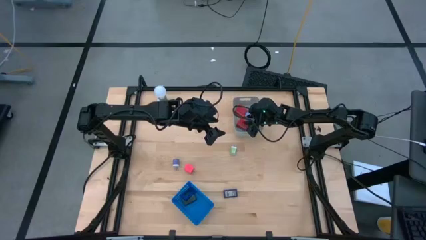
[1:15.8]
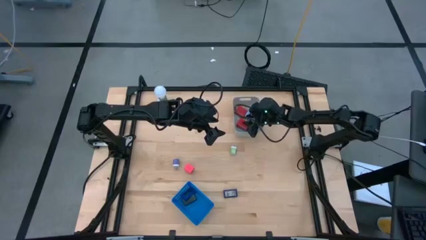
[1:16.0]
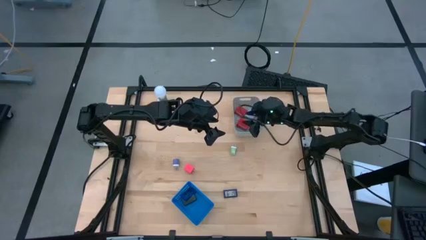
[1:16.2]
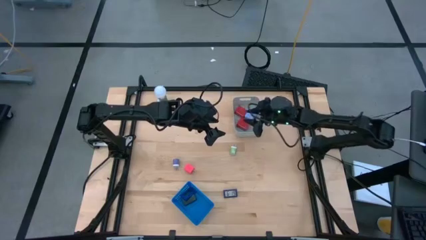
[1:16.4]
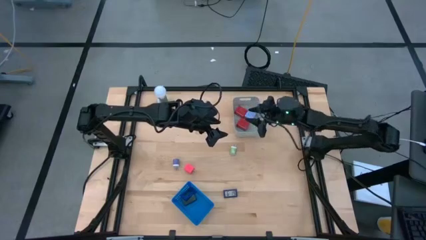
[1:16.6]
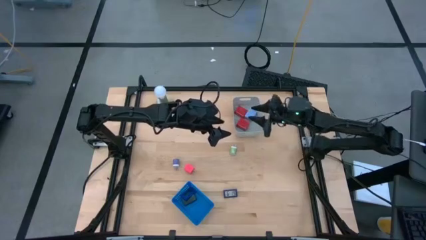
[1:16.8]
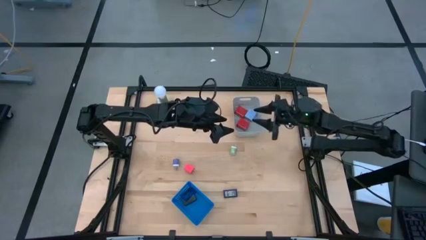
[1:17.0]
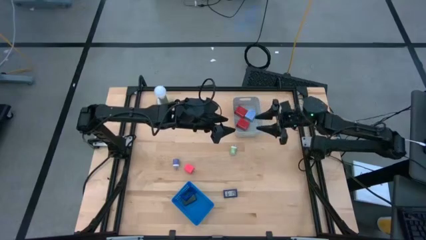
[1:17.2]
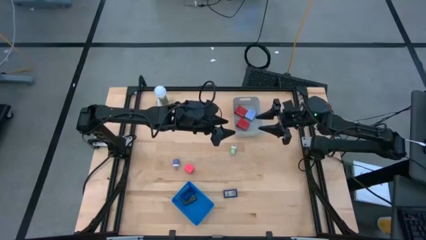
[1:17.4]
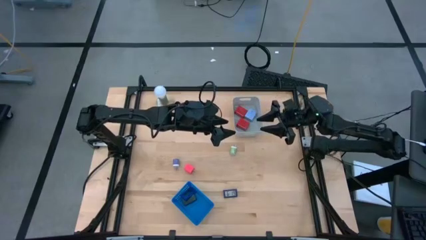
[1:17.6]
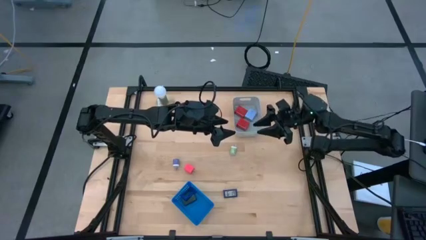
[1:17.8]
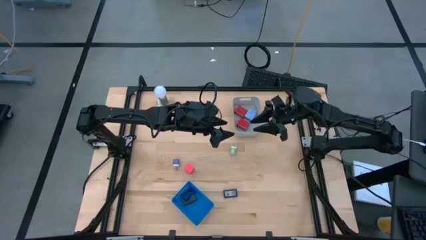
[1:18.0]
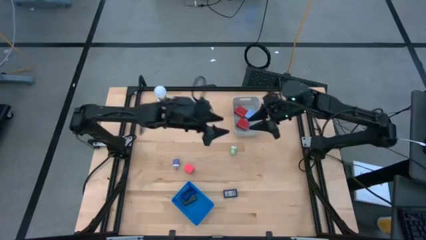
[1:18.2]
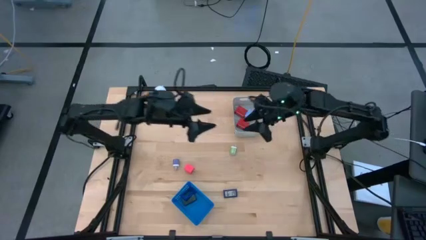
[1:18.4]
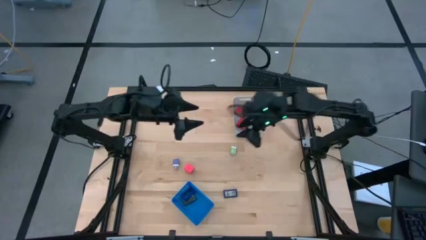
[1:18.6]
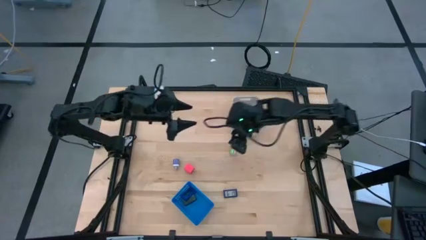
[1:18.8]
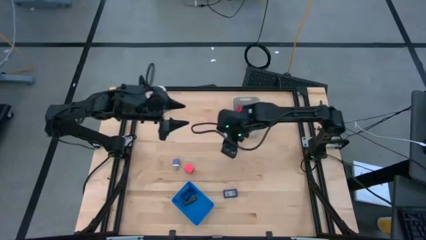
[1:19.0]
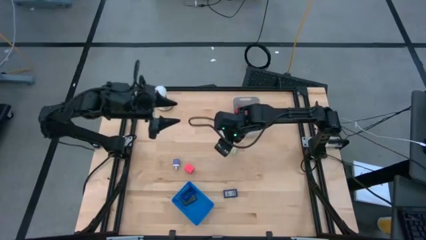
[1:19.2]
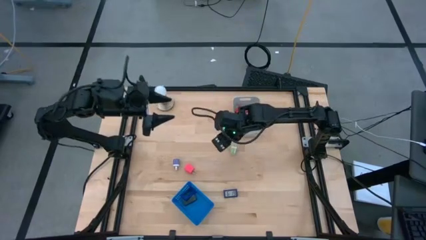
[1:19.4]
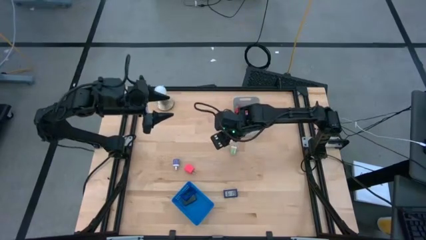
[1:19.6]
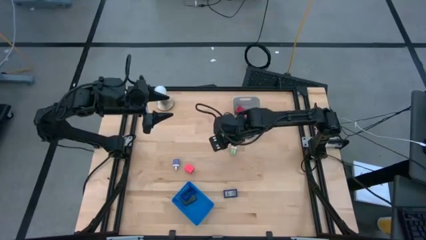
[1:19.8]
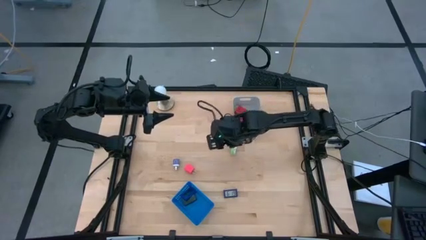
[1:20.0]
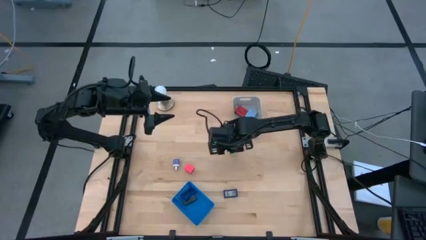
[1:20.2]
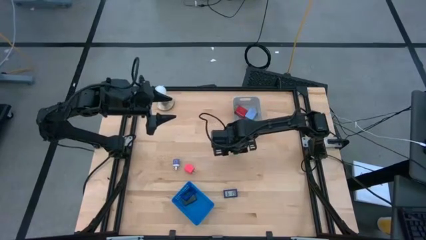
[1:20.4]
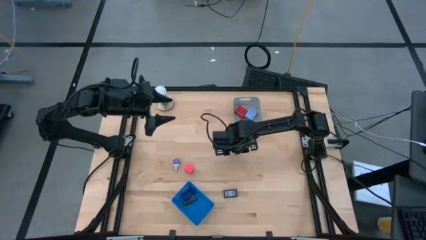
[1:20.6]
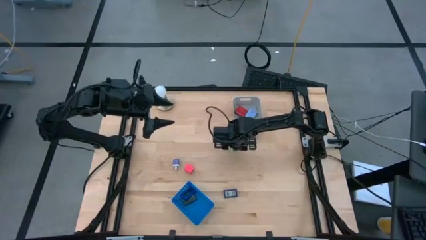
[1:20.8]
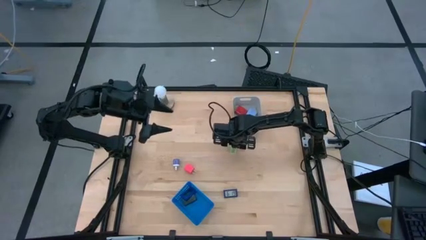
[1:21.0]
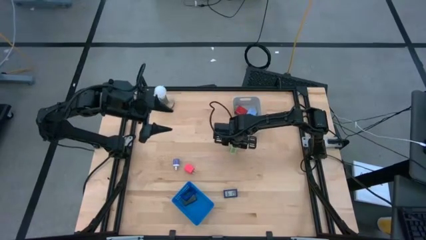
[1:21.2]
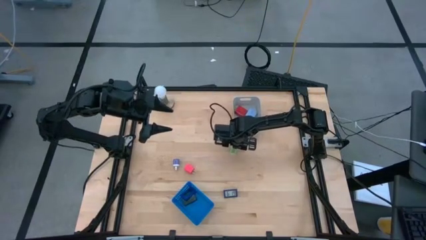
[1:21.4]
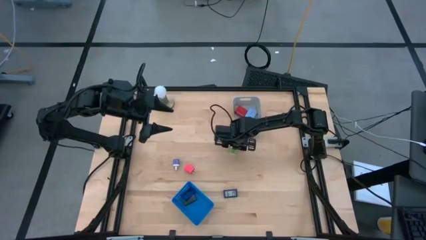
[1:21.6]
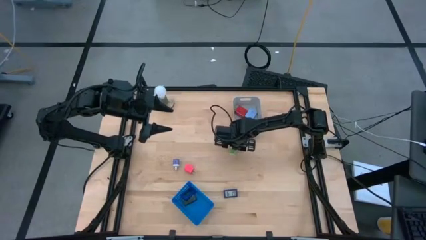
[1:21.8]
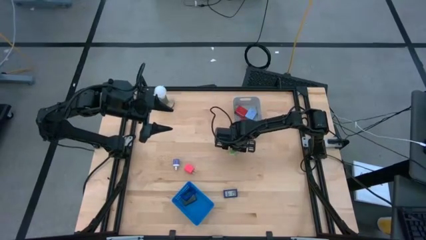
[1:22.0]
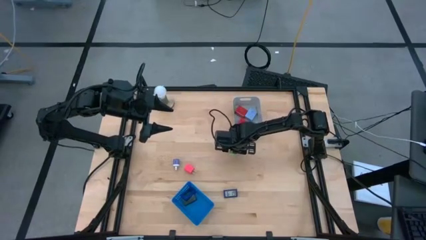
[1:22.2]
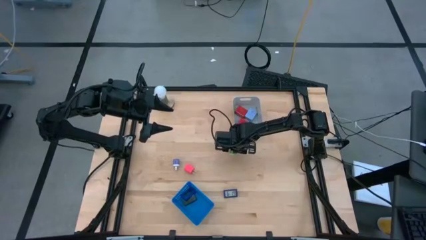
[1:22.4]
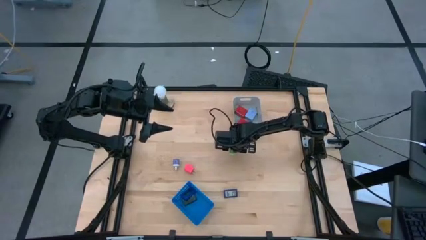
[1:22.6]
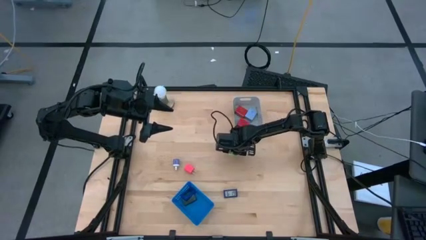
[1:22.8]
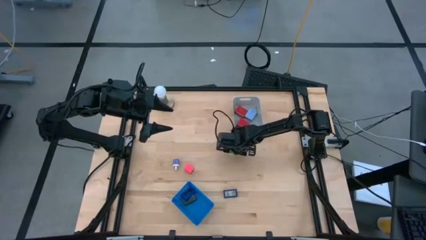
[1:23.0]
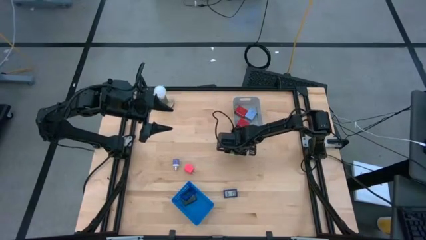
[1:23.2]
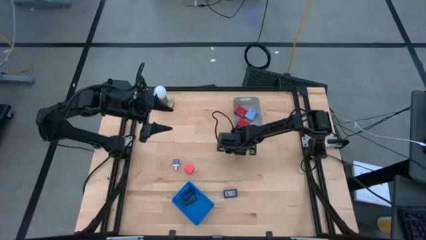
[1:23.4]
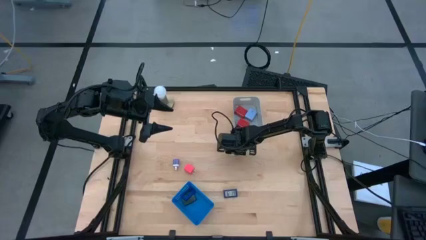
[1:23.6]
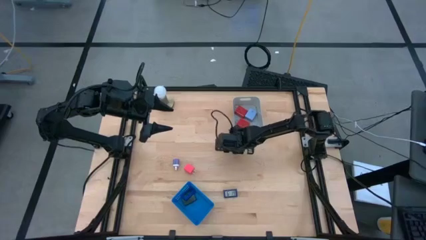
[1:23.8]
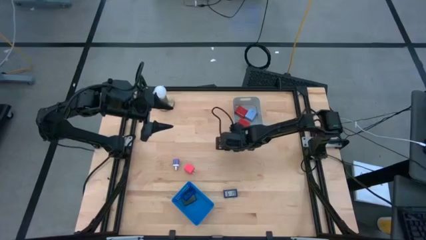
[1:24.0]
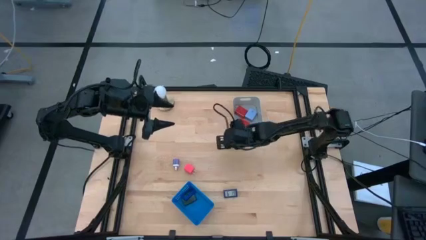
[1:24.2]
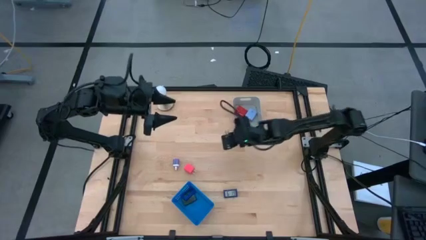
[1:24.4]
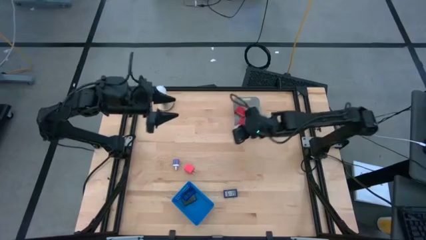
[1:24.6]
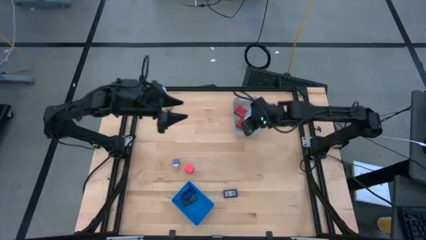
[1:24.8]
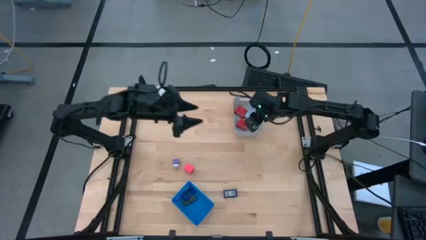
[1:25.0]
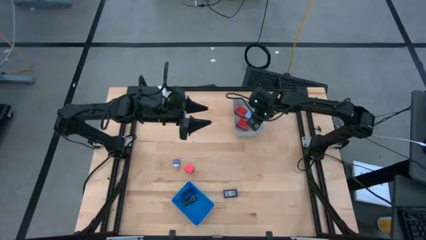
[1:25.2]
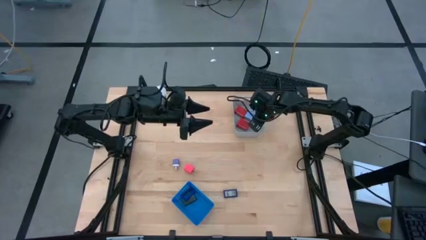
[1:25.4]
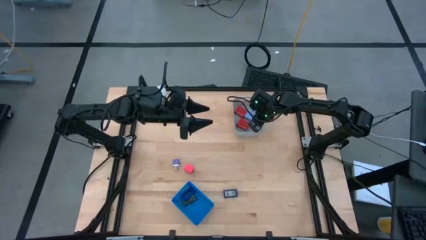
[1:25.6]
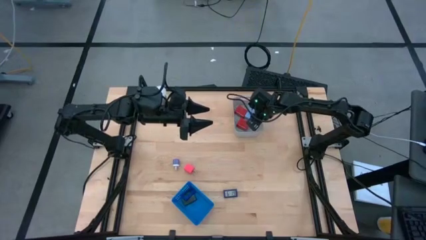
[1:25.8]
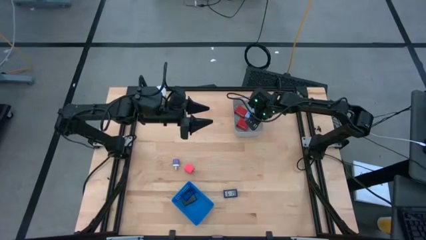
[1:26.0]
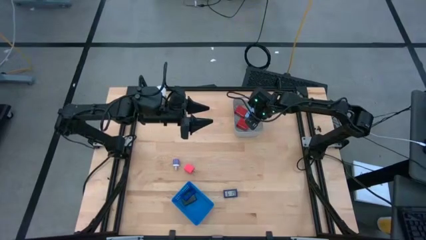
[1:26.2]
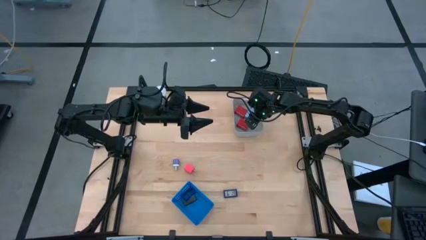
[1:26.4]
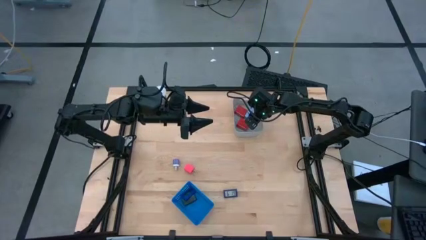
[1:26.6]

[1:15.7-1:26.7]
Task: Pick & Place Office items
Put the green charger adapter into the gray bin

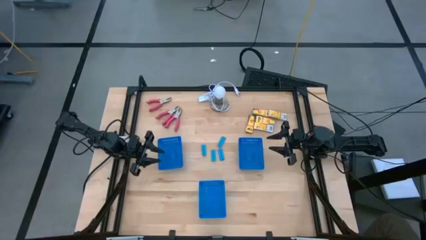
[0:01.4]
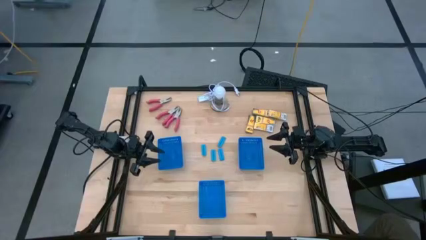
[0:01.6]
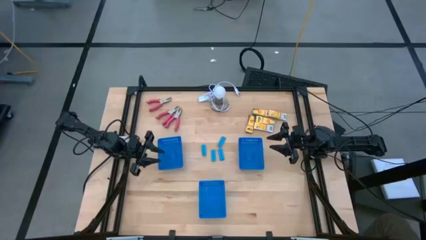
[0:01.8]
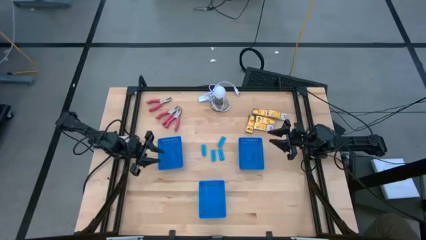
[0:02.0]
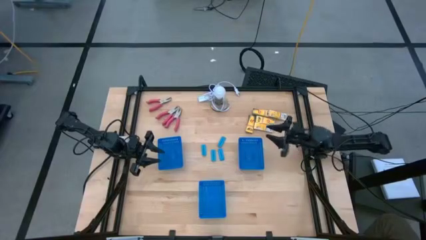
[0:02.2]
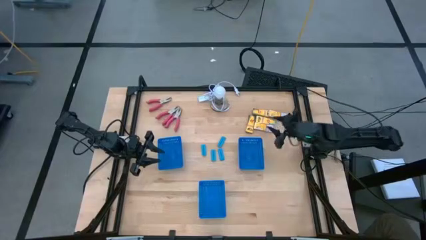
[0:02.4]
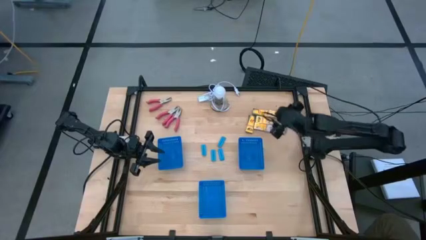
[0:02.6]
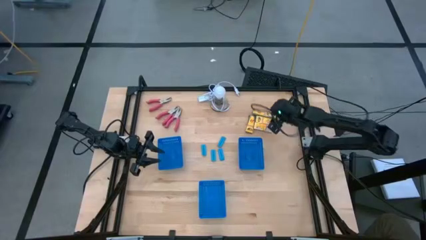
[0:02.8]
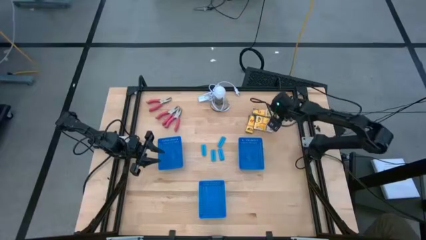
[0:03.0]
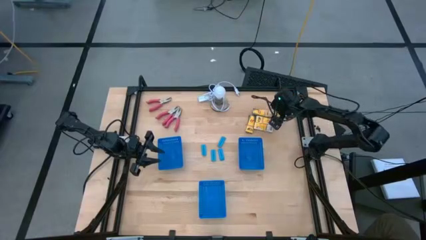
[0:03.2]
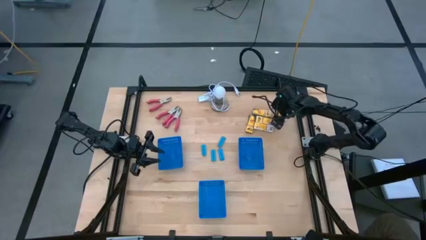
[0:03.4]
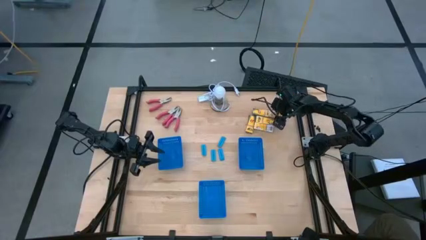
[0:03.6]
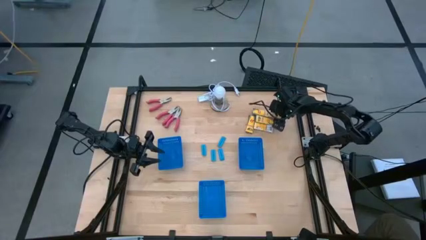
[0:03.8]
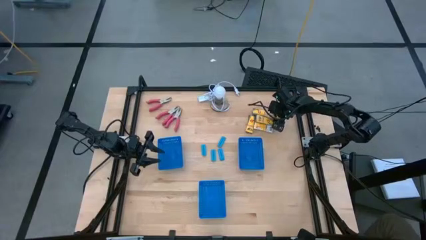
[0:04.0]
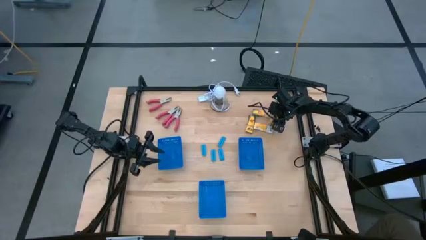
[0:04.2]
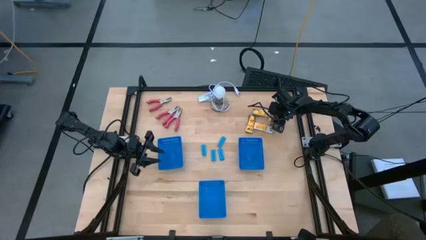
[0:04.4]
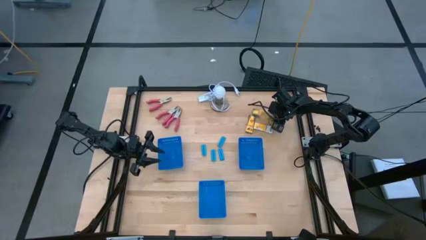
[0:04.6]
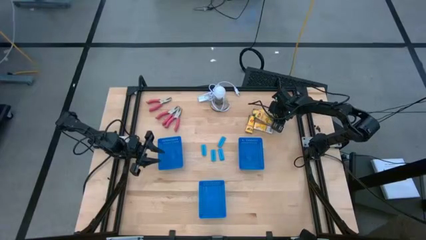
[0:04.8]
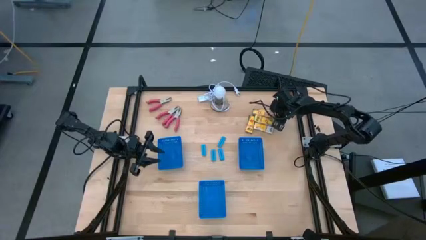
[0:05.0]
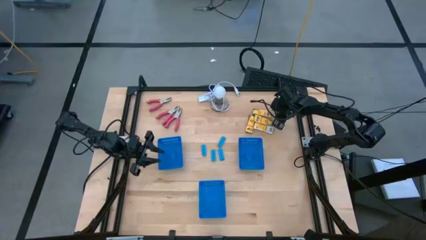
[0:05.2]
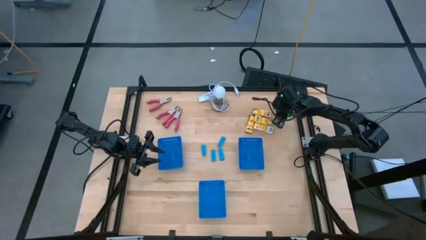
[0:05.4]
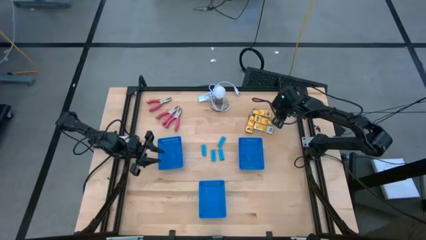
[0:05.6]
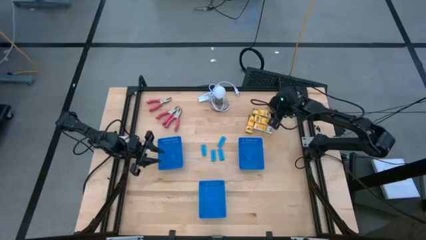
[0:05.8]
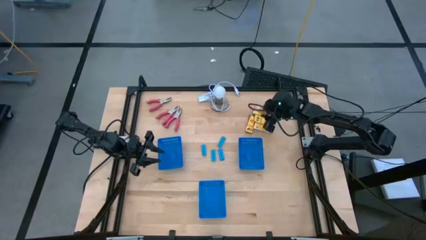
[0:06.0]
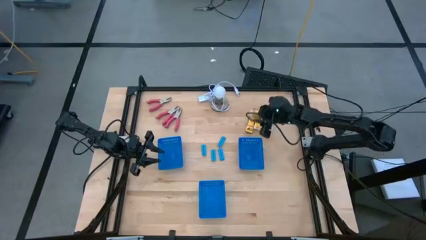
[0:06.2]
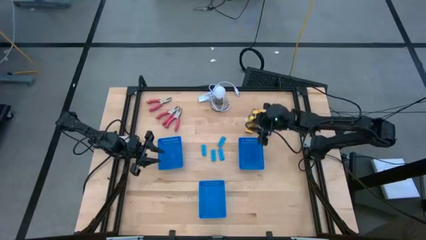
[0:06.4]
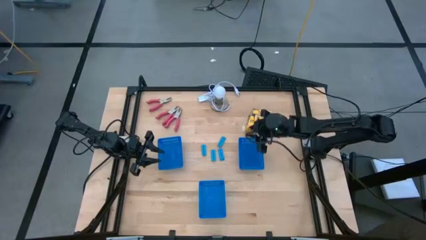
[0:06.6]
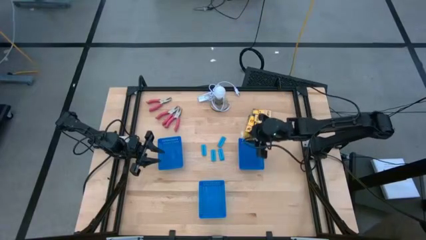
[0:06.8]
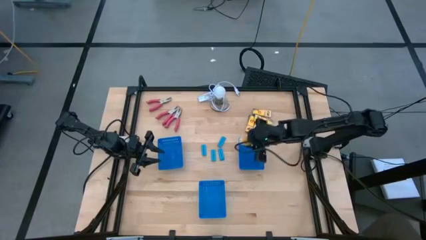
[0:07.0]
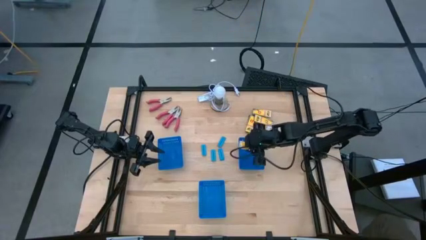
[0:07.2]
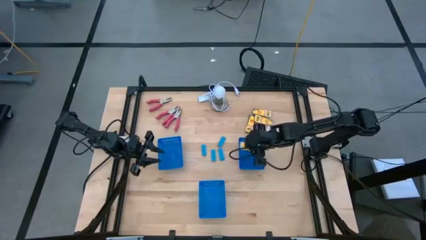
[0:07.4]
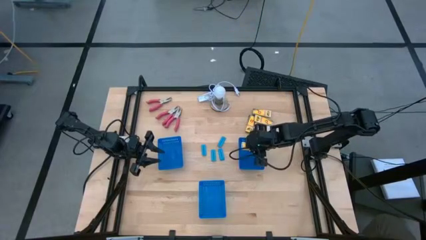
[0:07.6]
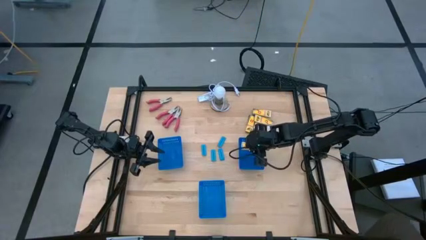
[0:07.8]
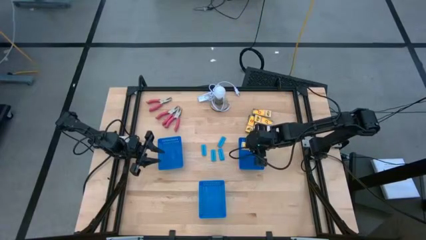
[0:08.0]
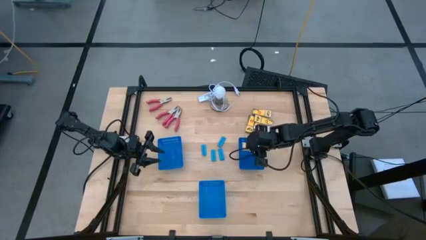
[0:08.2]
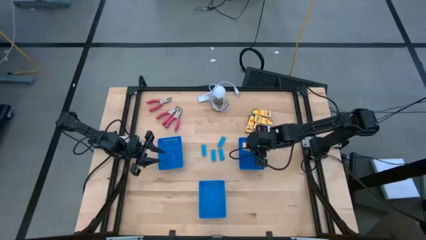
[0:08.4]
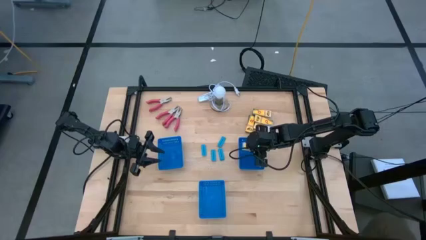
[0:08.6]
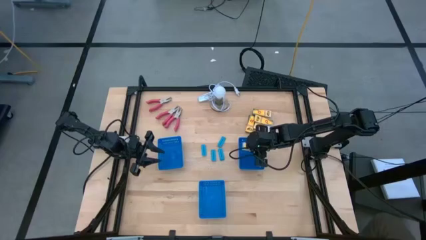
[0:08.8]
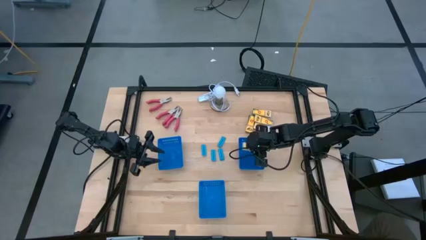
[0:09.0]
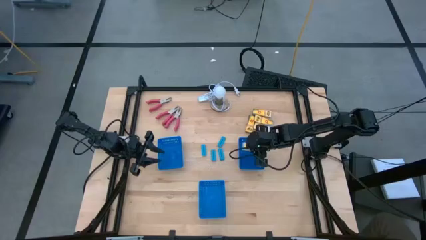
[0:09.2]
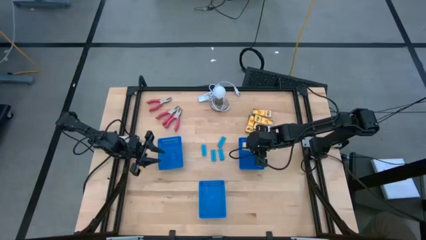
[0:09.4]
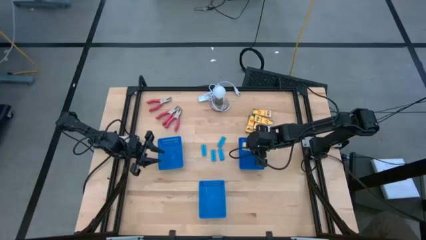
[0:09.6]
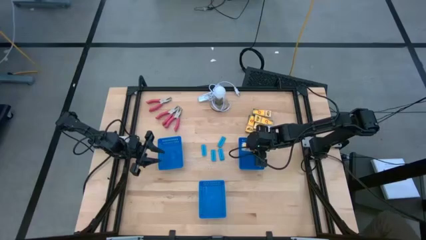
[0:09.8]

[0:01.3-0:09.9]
Task: Pick & Place School Supplies
Put the yellow crayon box into the top right blue bin
